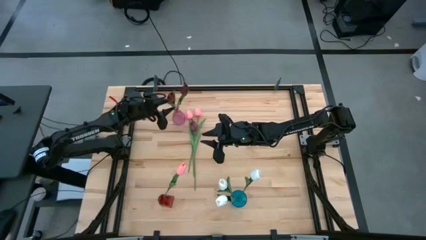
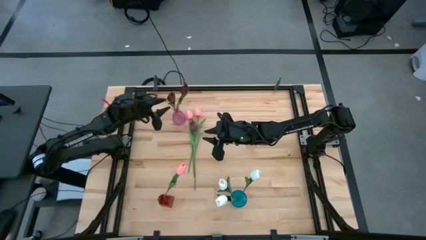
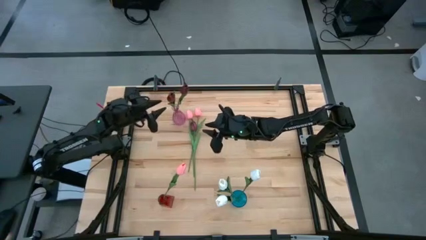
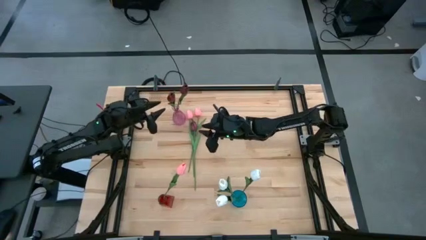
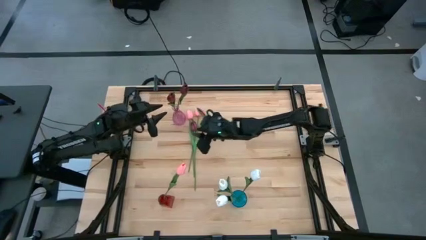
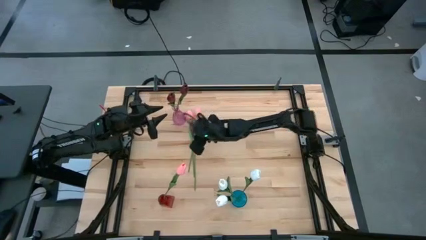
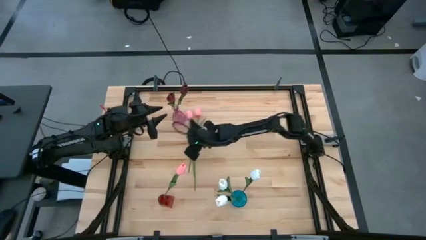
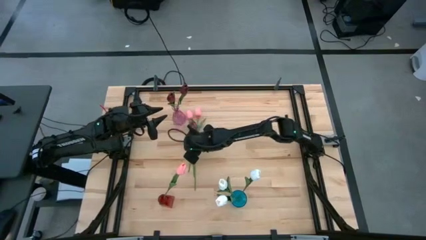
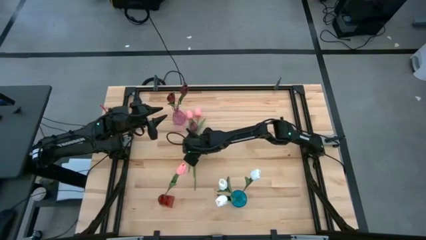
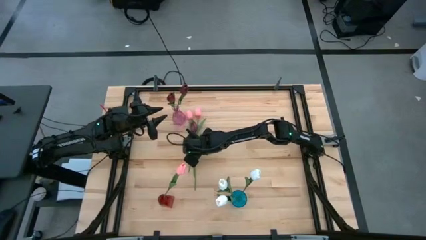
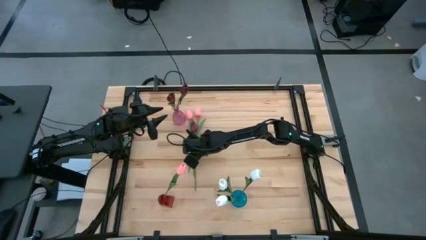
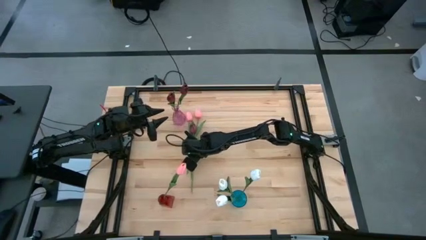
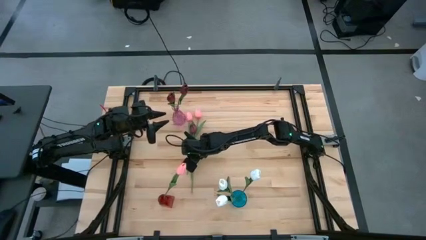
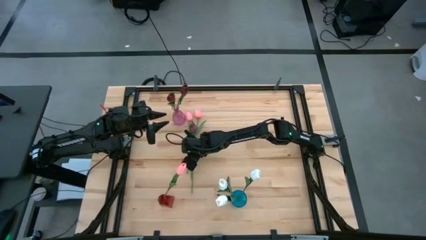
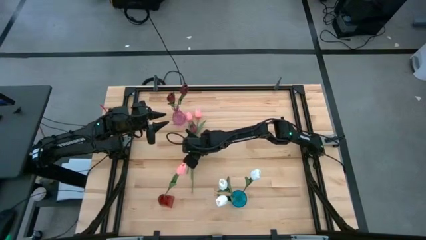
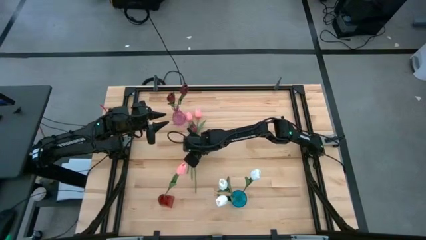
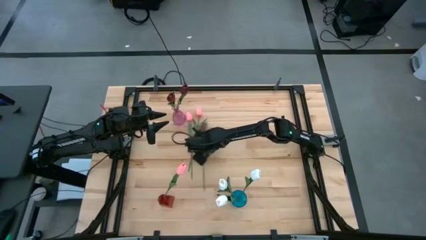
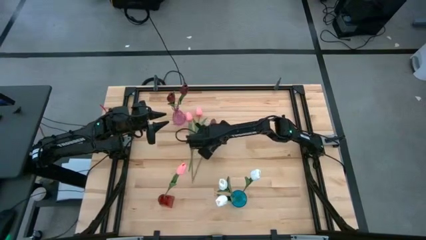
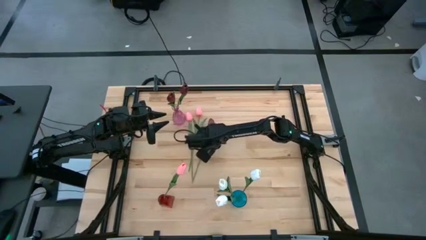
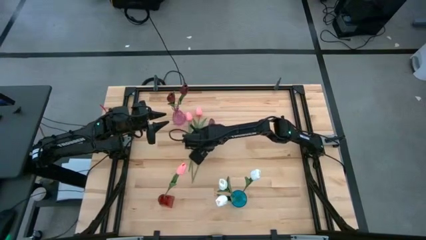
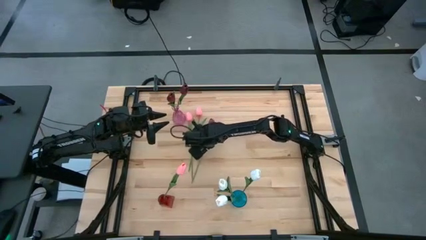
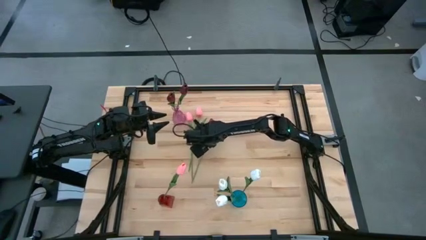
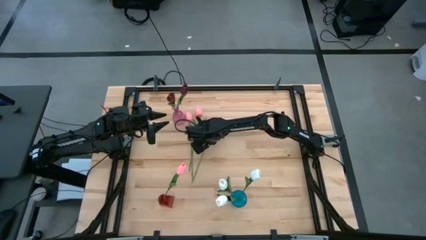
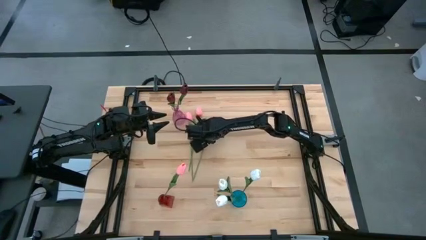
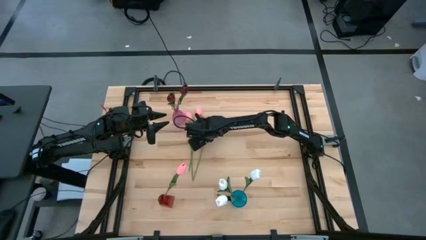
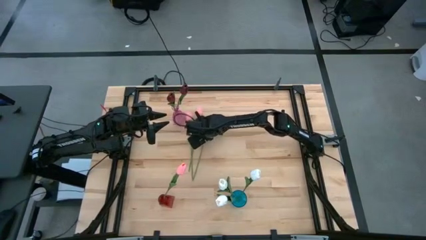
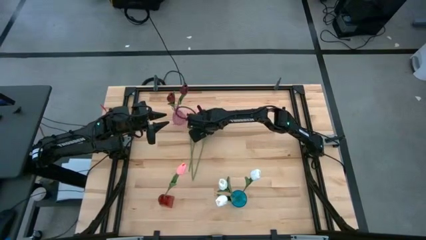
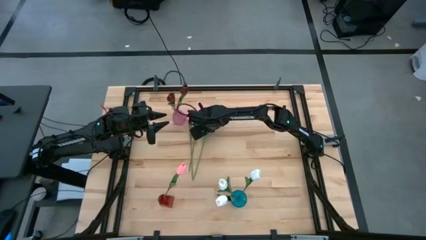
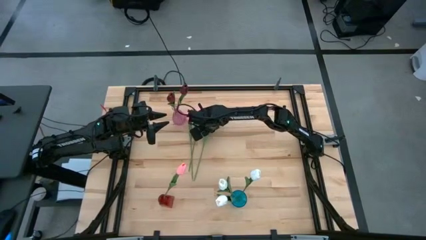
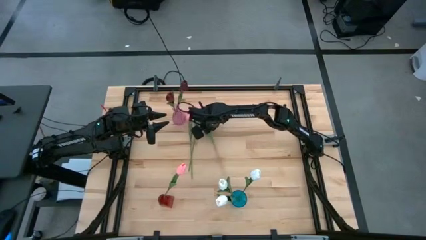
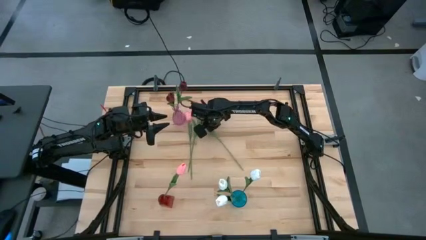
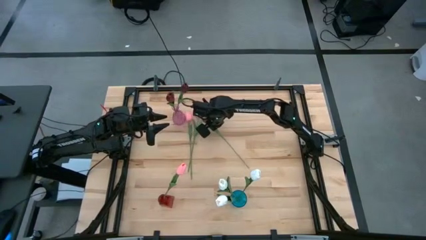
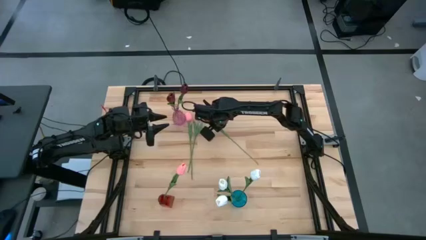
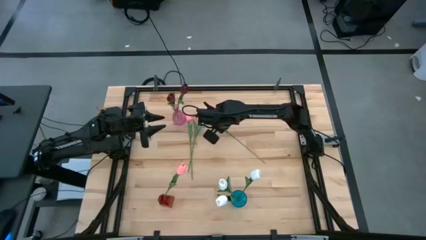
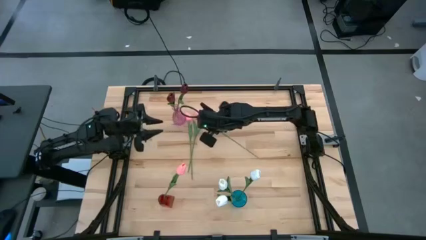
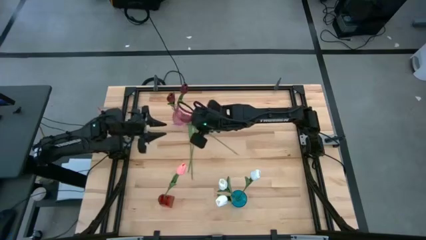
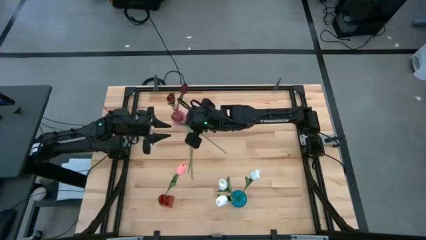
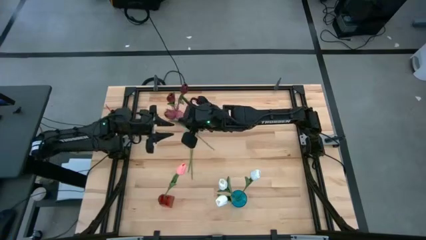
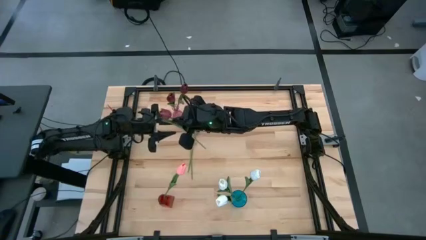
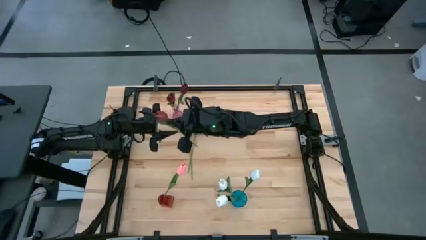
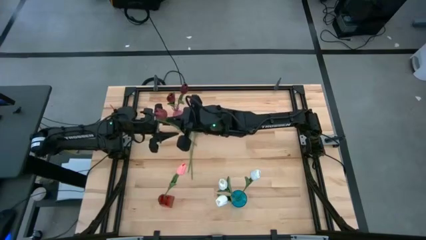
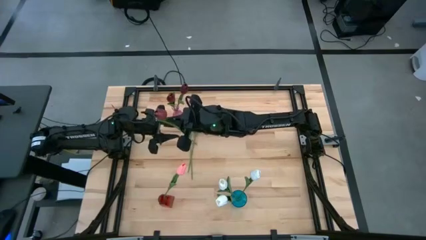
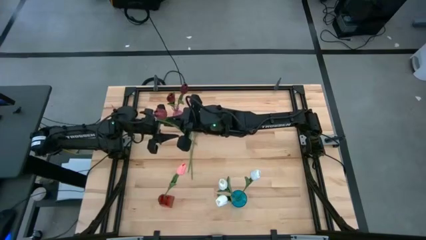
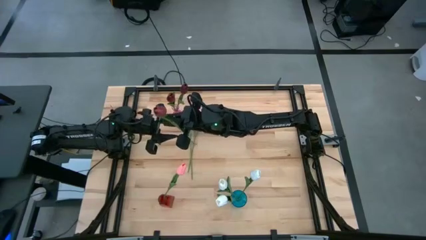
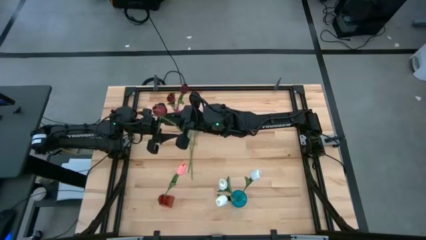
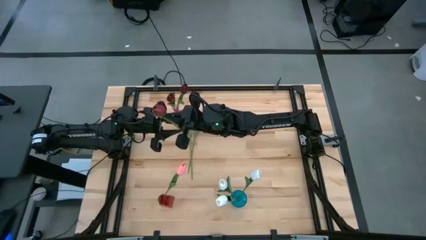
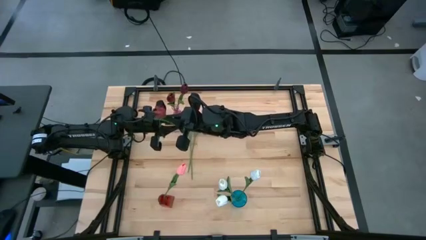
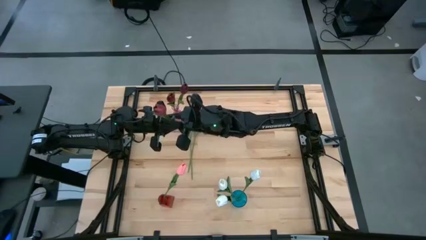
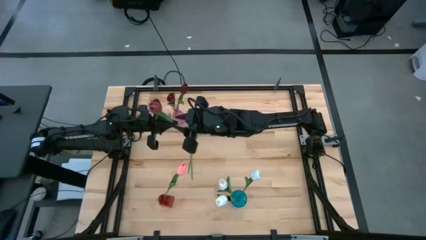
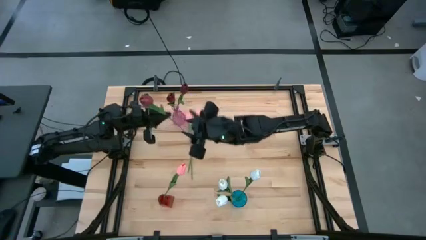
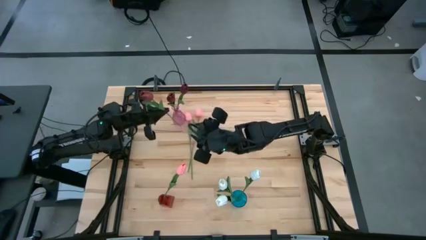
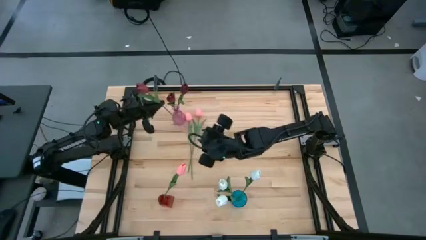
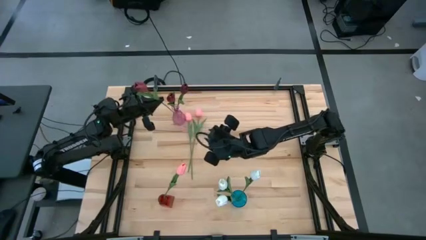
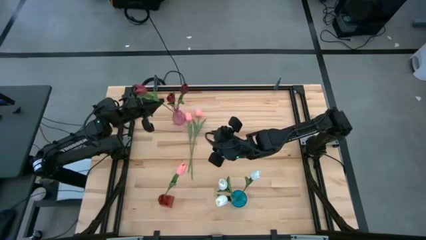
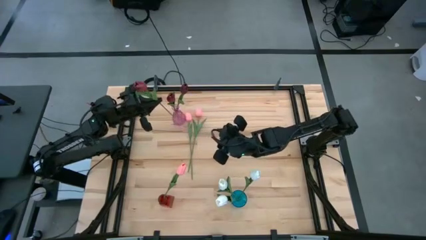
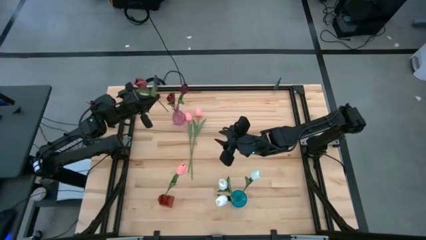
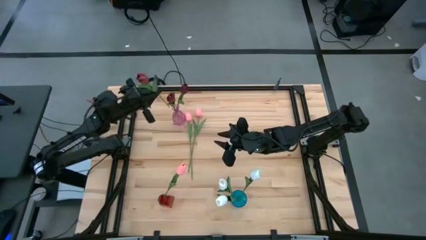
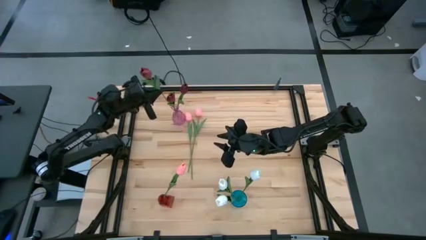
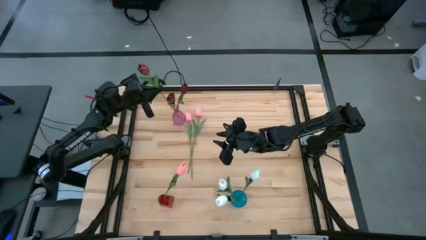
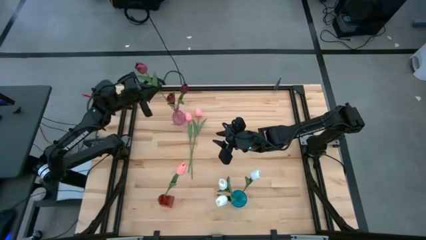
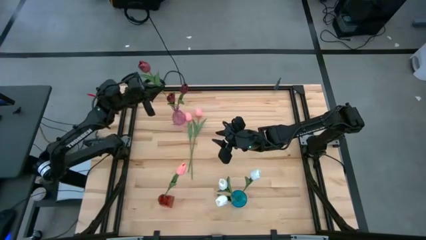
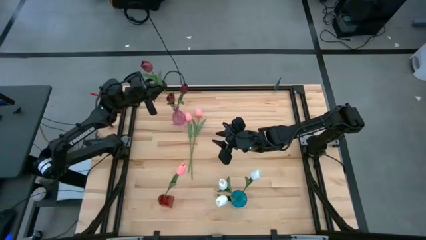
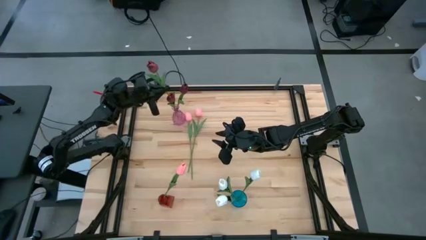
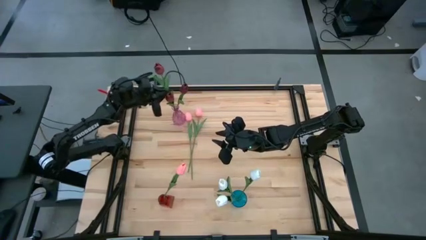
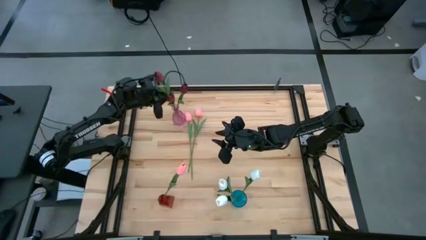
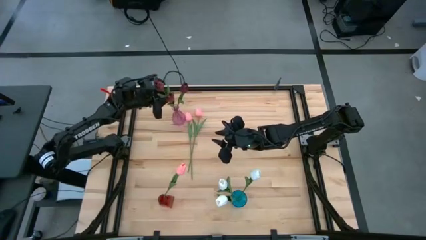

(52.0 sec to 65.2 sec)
Task: Sort flowers into vase by color
Put the red flower into the purple vase

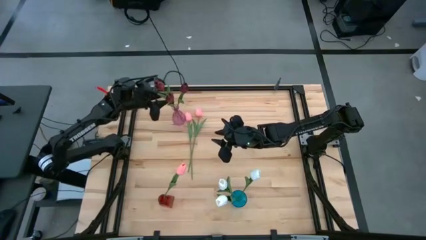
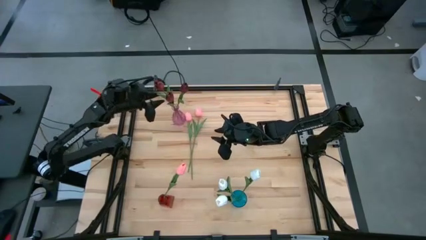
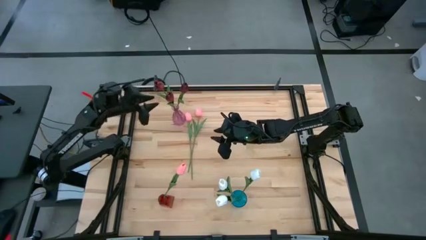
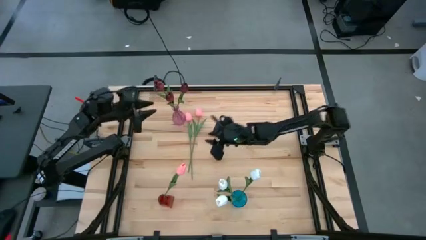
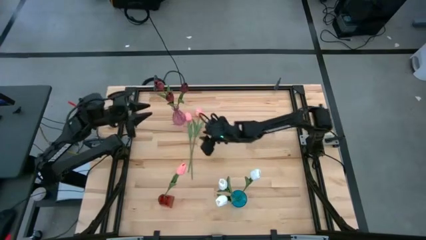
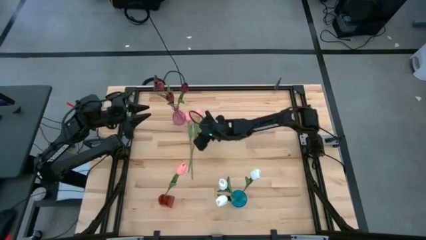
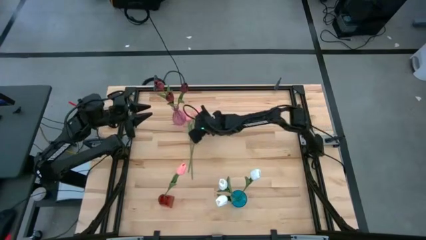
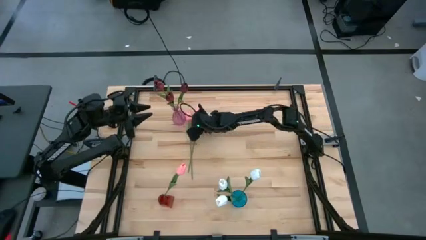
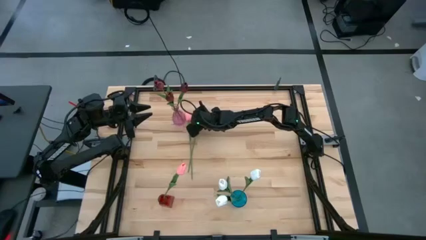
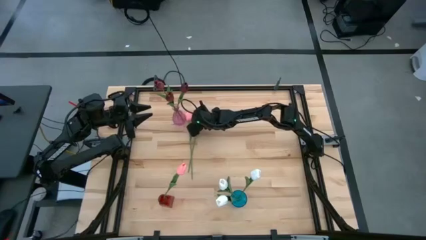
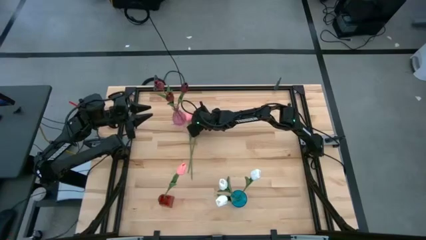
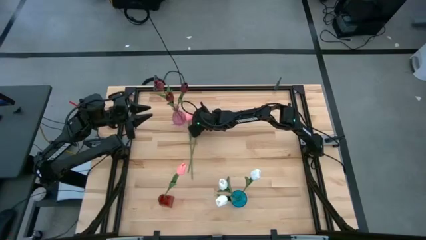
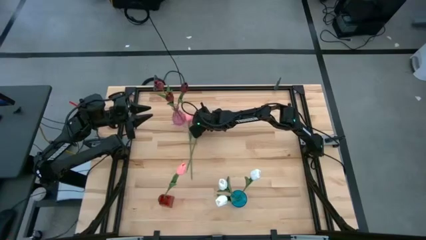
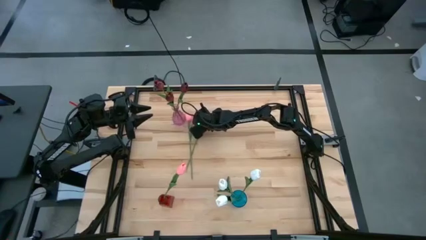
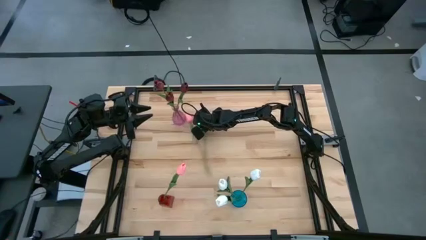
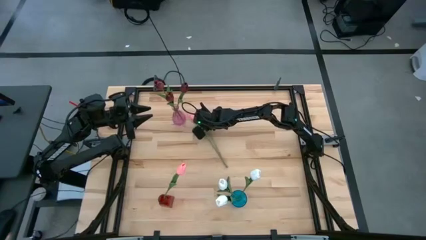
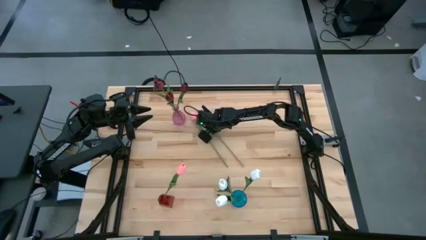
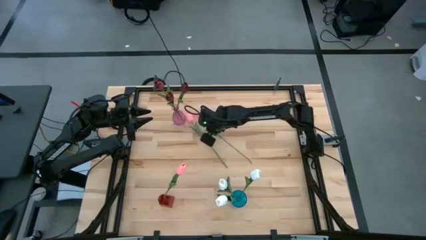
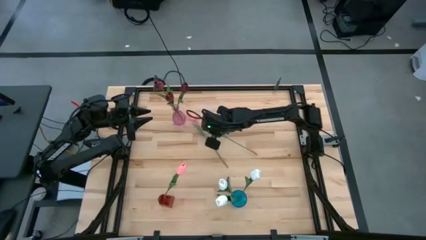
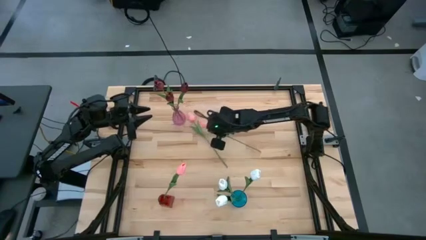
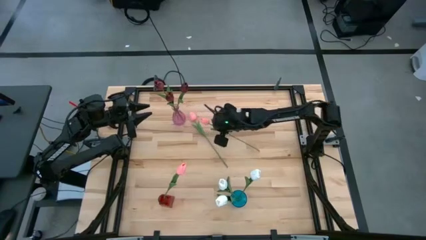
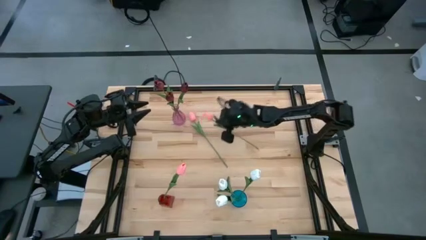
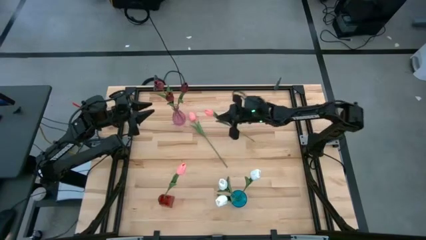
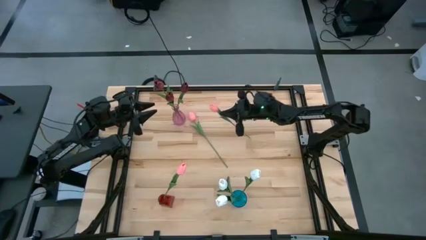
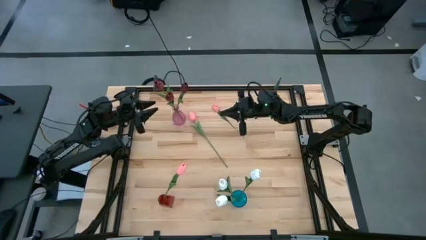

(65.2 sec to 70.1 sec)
Put the right pink flower into the red vase
